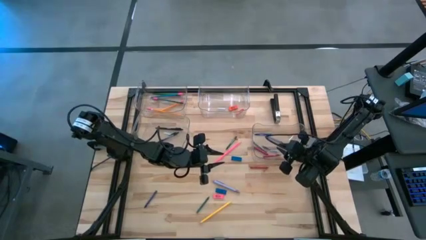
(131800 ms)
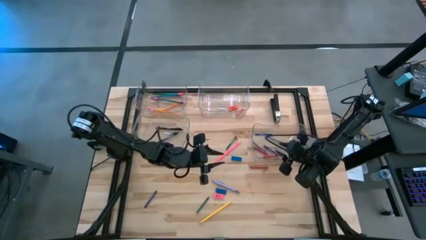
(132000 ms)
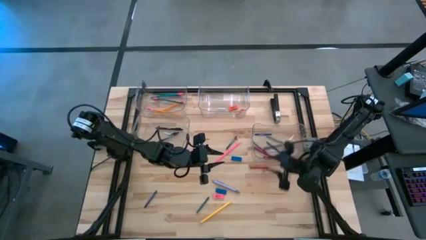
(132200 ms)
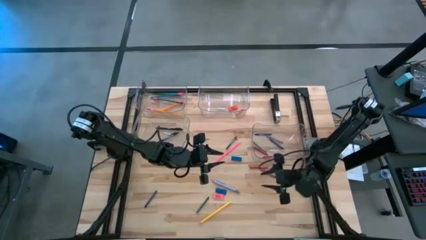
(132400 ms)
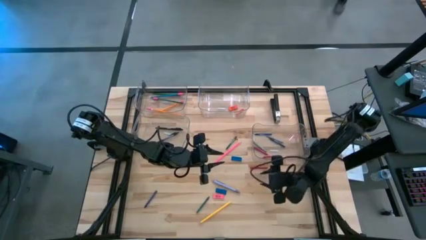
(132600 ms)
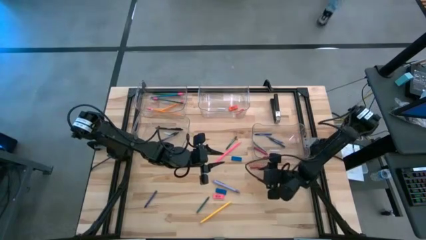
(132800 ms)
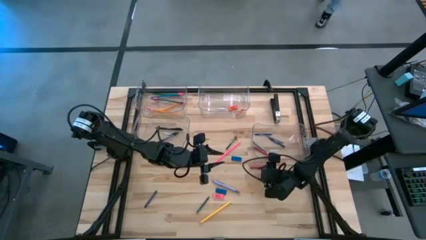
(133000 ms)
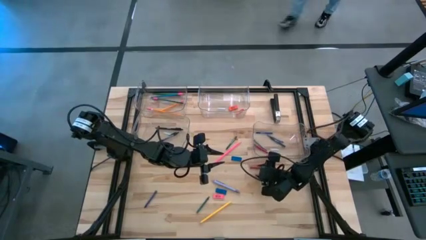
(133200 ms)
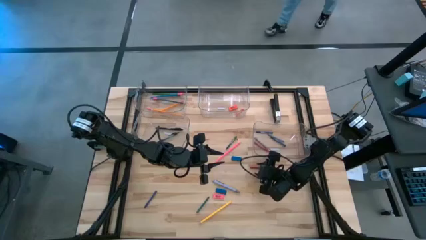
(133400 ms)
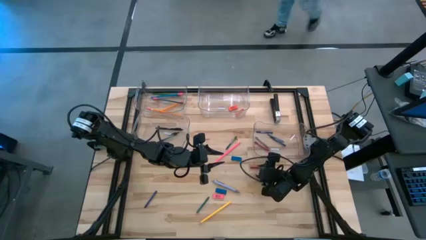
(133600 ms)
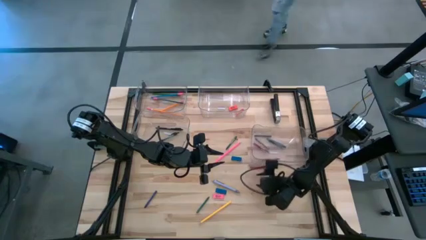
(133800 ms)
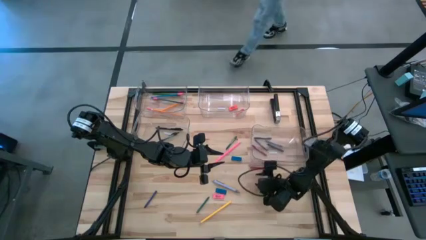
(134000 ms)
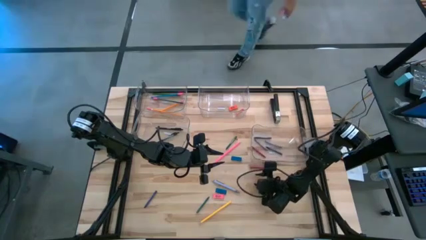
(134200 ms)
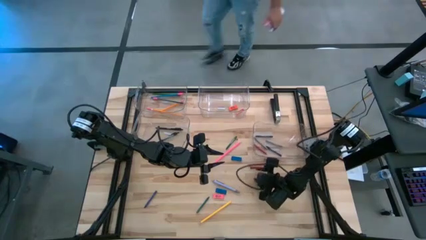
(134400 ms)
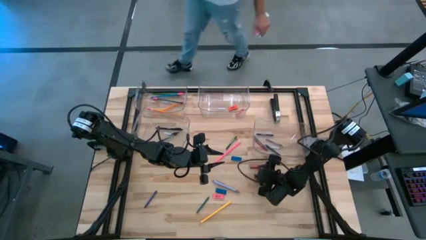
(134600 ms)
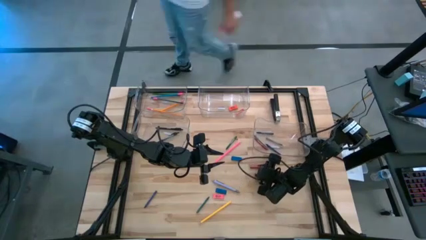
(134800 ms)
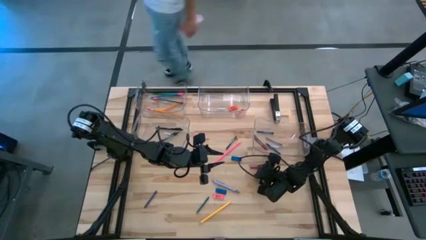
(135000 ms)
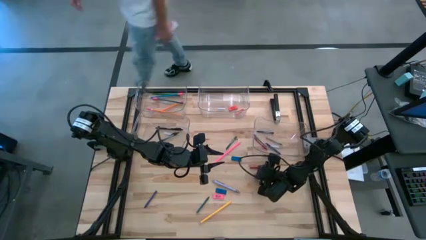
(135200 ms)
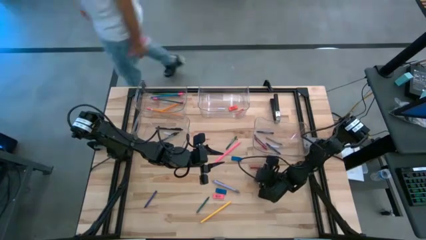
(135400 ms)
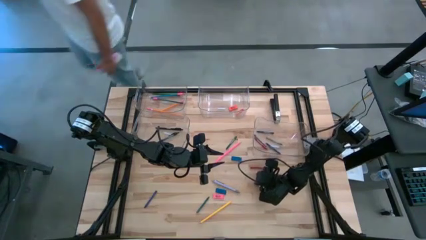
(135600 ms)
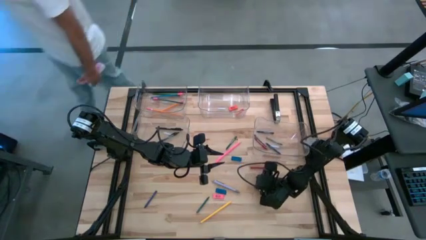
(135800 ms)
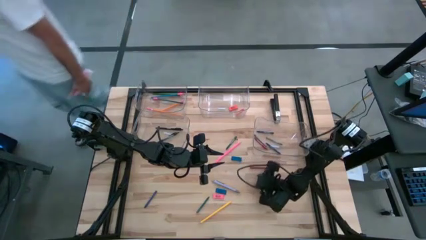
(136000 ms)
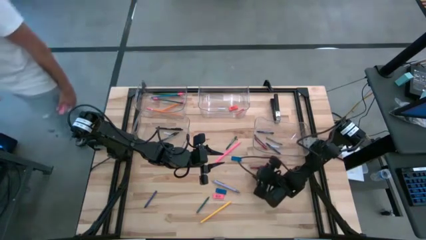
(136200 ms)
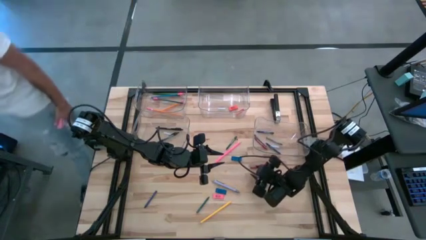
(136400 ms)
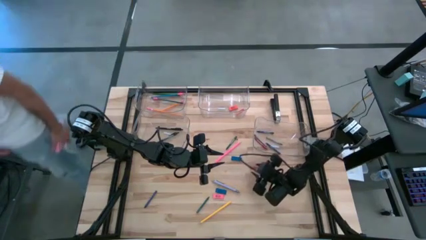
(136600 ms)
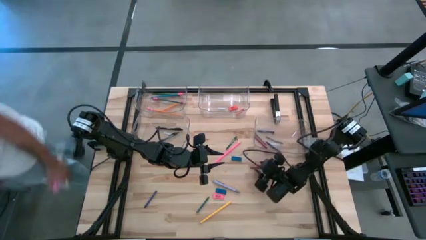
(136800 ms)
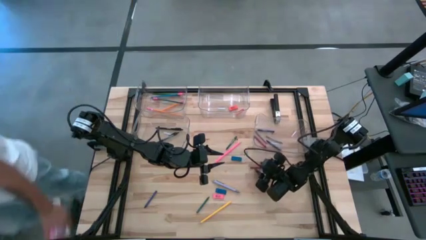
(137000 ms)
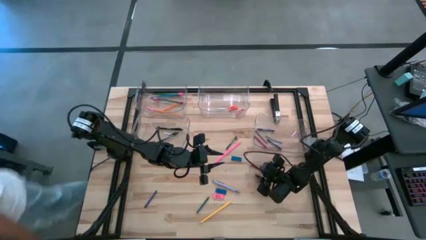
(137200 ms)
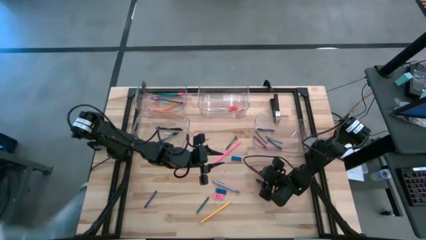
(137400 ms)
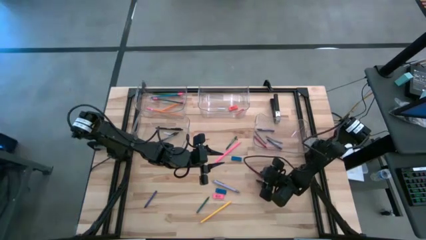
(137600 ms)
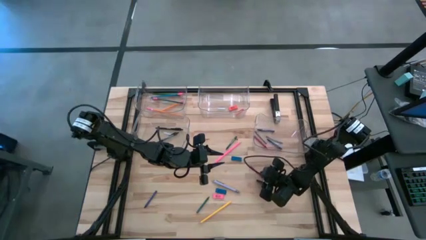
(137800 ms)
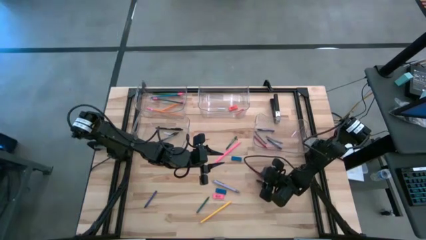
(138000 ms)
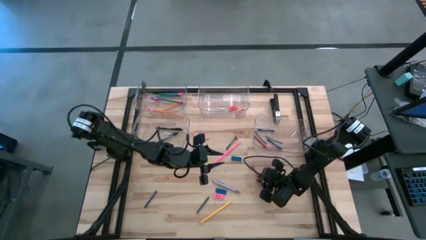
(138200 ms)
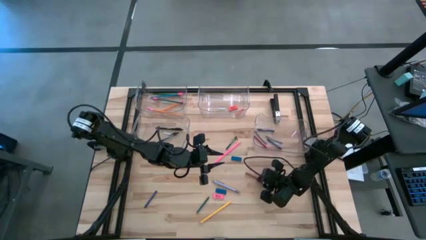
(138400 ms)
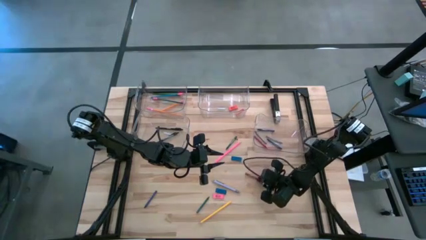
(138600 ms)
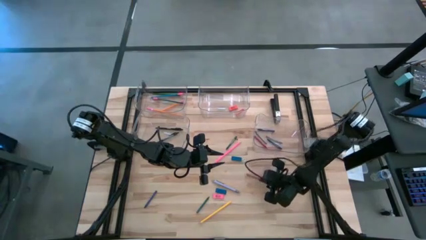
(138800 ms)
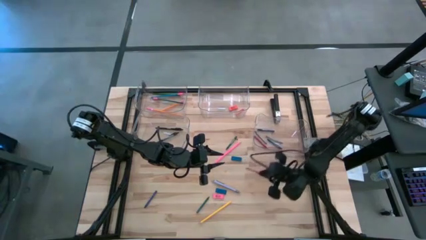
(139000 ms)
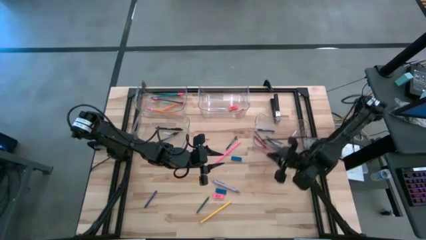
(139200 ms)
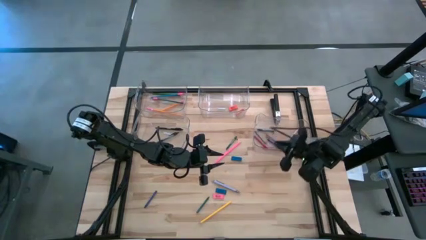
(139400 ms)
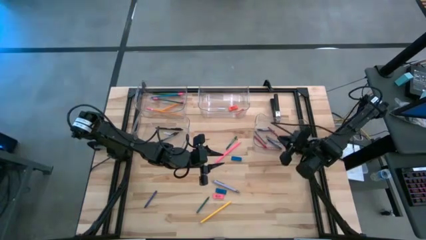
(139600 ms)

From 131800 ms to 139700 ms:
Task: Sort crayons/erasers/pens/pencils in bins
Put the red crayon into the bottom right transparent bin

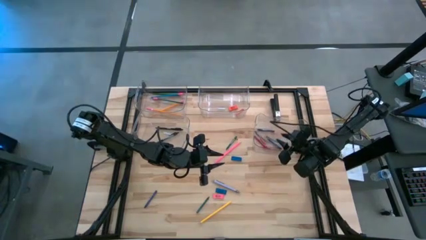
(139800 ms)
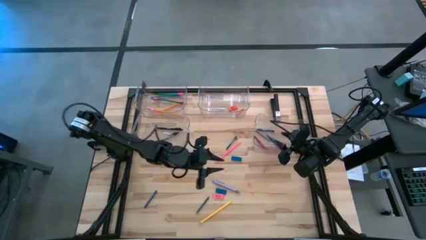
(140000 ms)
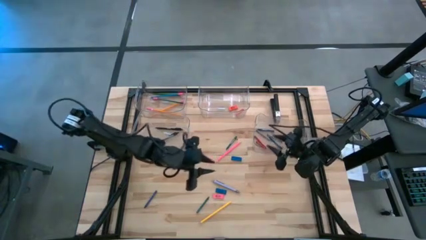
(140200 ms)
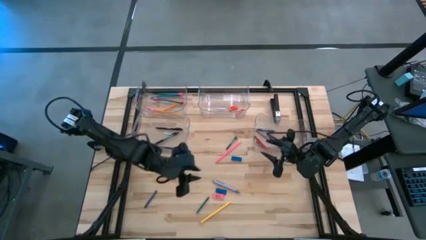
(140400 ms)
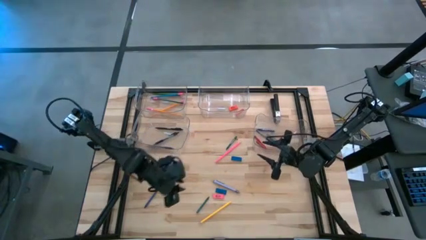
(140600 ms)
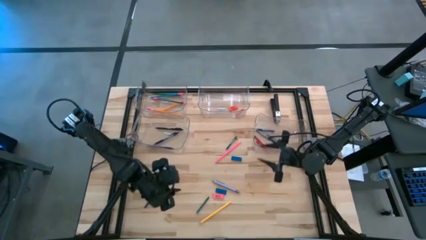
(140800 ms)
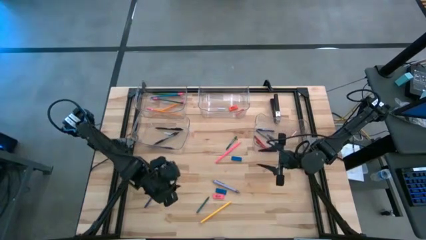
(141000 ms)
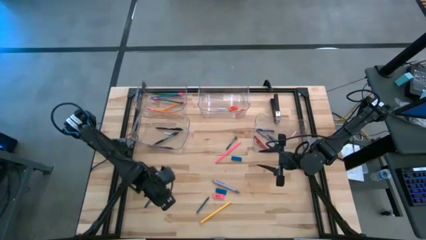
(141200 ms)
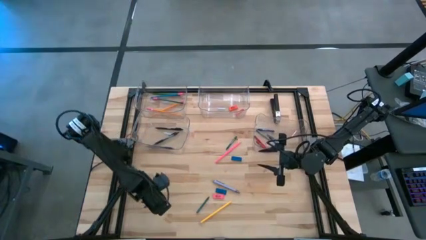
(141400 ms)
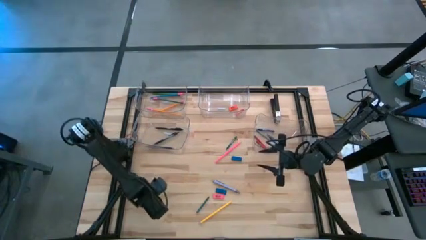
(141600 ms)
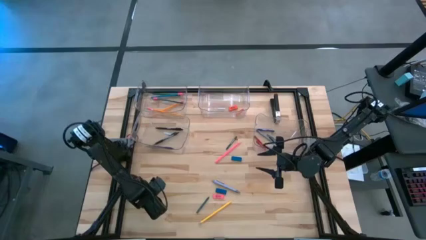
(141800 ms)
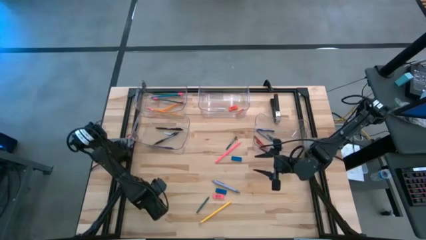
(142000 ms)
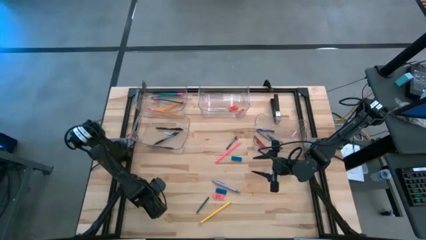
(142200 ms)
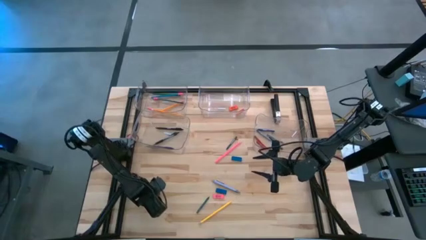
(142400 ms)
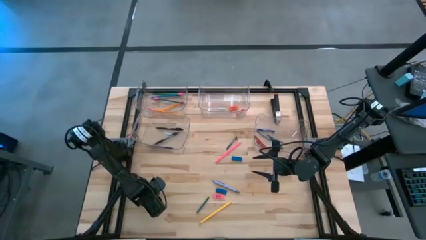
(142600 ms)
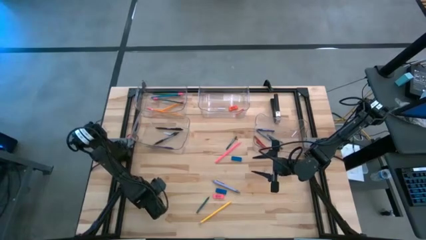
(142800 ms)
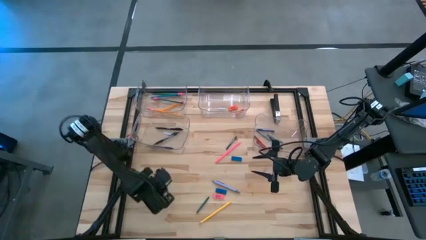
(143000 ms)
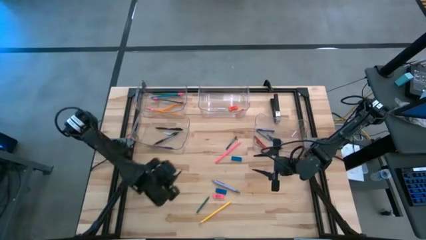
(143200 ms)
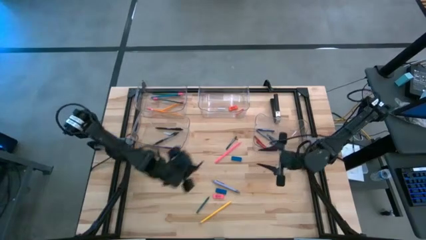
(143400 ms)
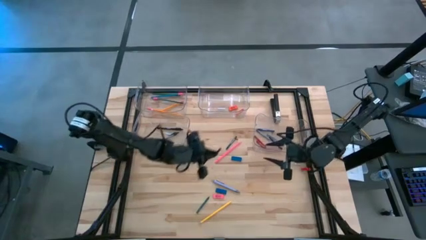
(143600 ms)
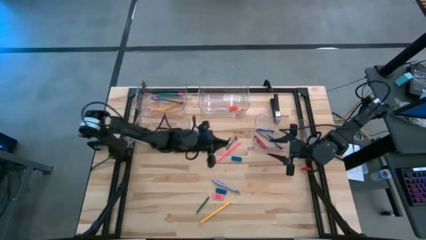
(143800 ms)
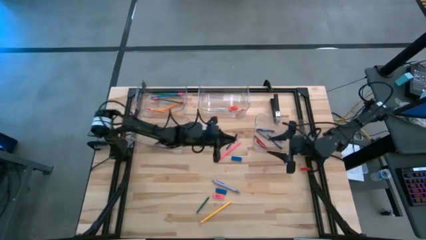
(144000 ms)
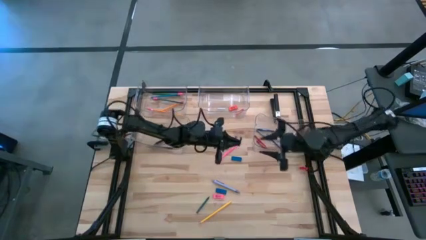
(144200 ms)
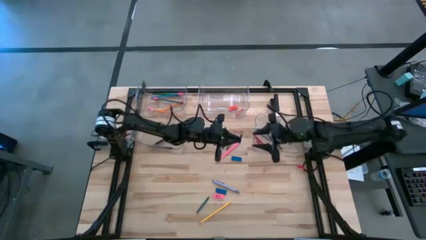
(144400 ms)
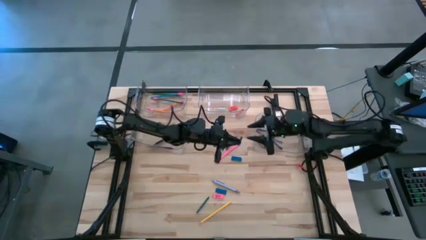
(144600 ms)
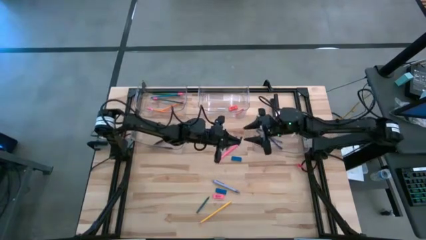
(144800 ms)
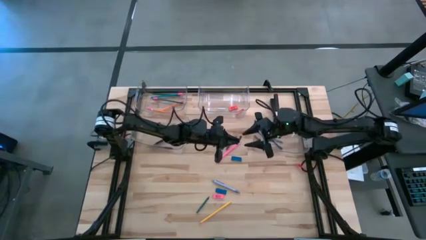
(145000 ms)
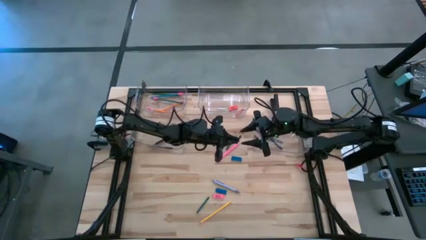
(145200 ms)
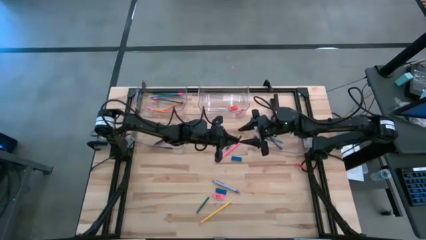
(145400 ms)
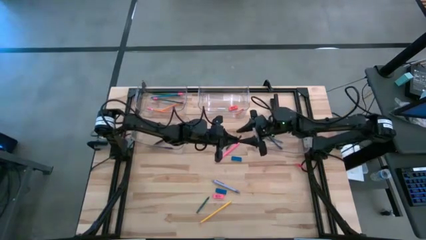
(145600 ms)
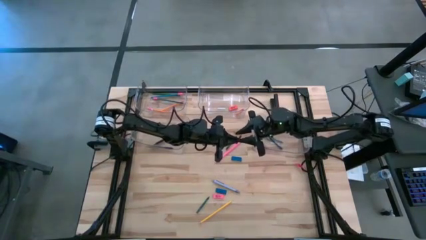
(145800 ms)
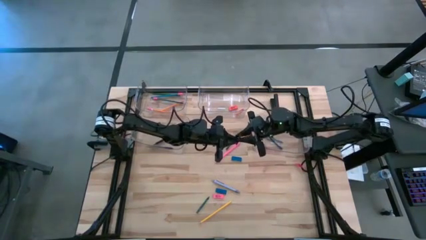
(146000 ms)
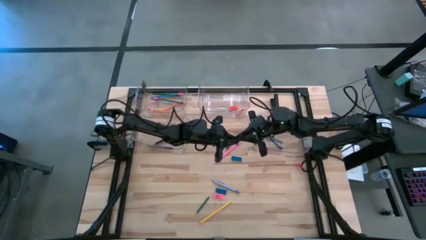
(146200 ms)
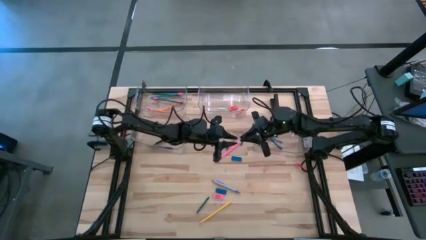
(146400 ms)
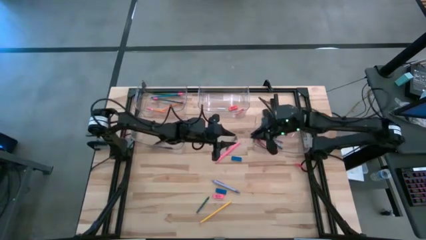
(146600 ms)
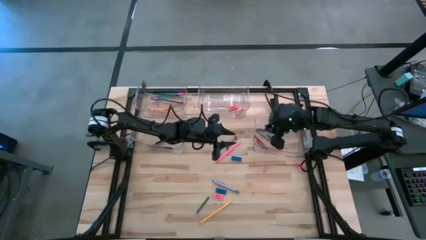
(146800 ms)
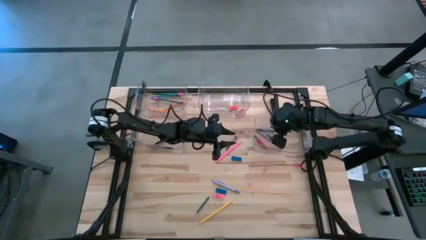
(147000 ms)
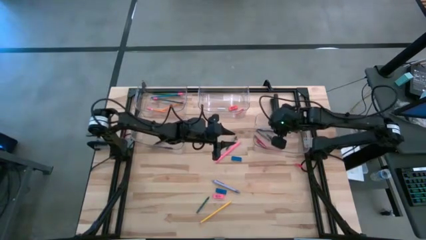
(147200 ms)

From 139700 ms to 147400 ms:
Put the blue crayon into the bottom right transparent bin

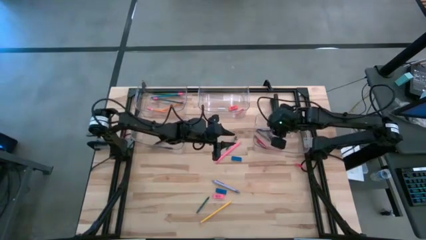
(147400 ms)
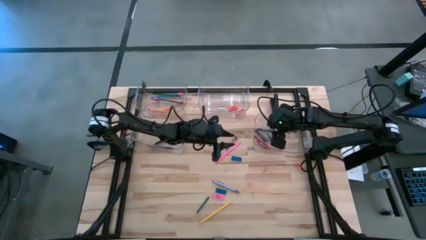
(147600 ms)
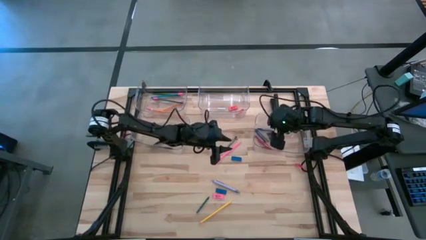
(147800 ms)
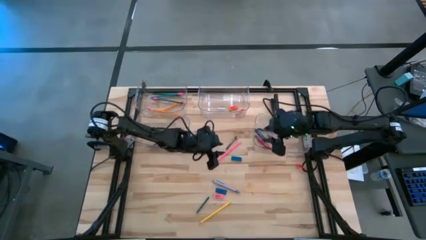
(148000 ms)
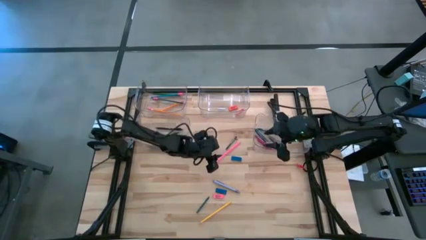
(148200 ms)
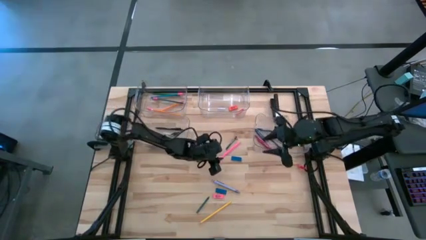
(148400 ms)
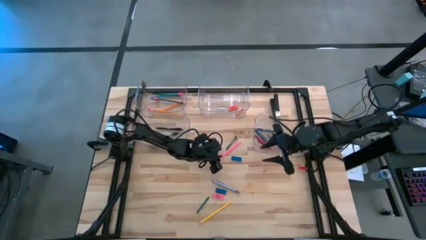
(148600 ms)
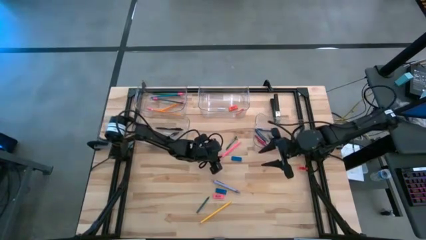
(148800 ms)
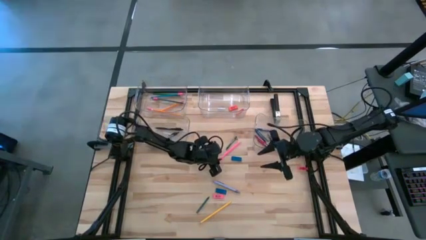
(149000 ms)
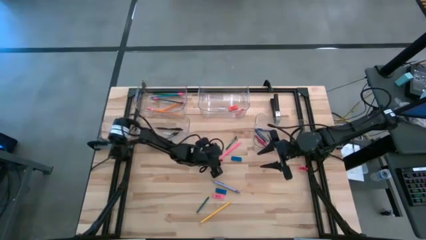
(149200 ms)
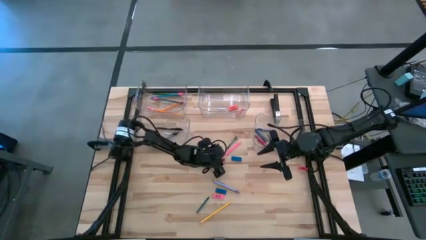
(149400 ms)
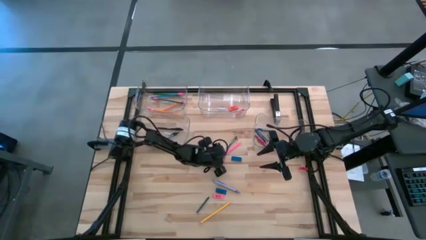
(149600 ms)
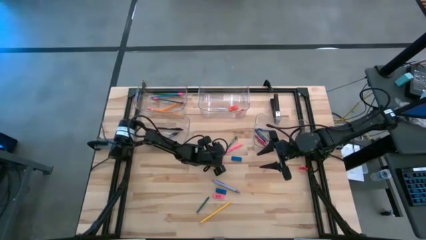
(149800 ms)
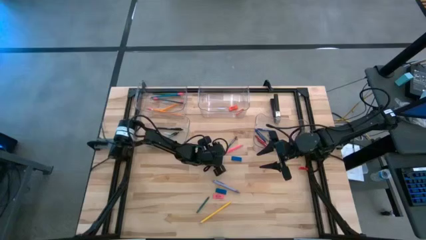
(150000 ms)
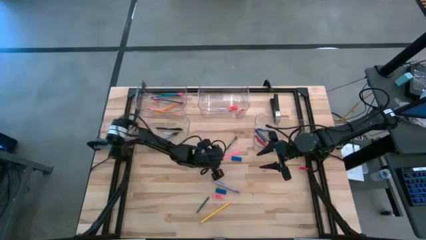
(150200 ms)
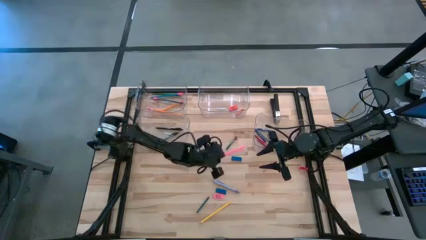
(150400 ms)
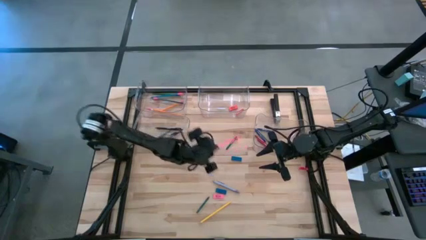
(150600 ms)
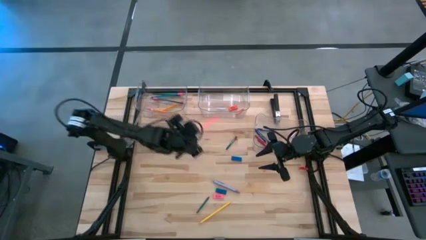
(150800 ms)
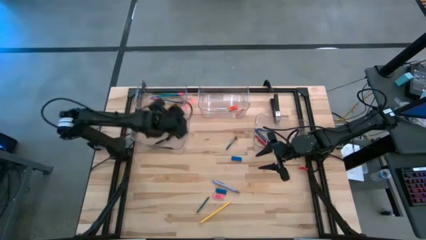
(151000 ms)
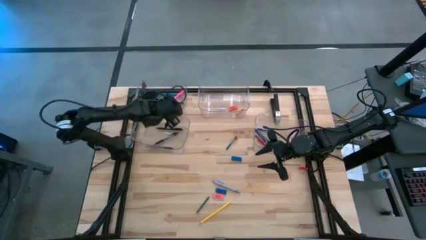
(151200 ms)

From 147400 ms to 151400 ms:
Put the pink pencil into the top left transparent bin
